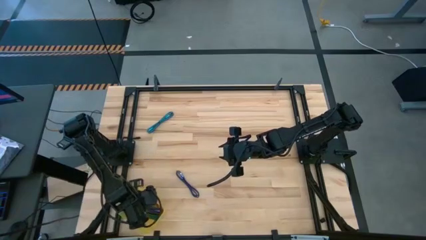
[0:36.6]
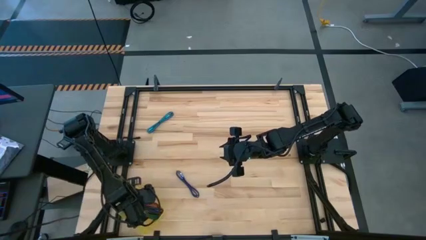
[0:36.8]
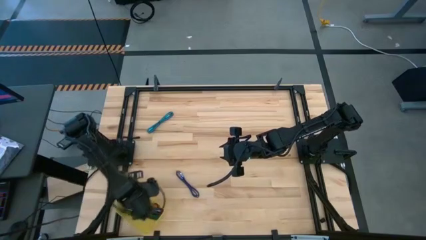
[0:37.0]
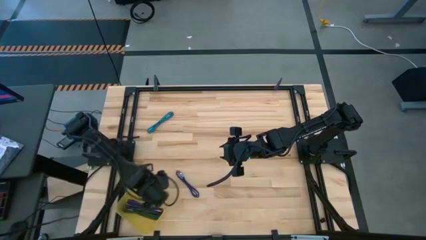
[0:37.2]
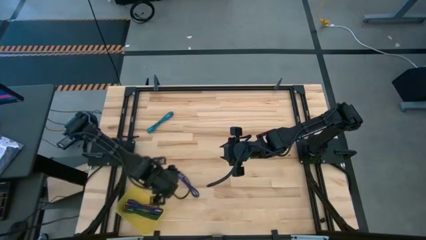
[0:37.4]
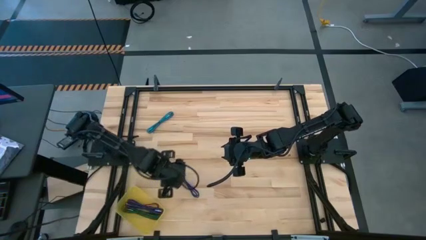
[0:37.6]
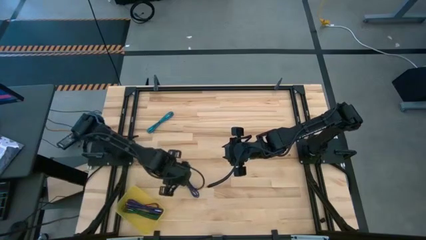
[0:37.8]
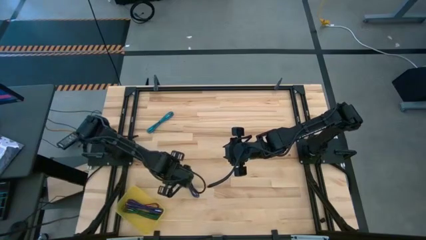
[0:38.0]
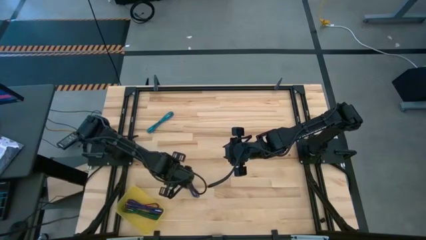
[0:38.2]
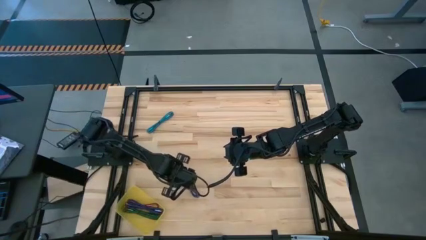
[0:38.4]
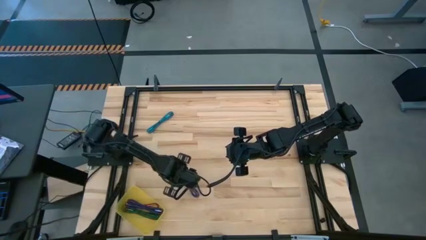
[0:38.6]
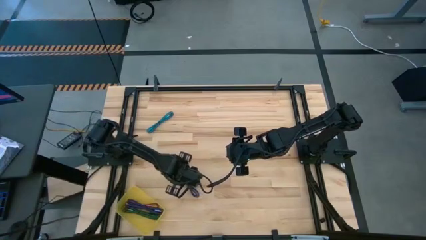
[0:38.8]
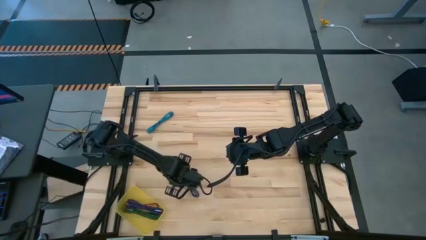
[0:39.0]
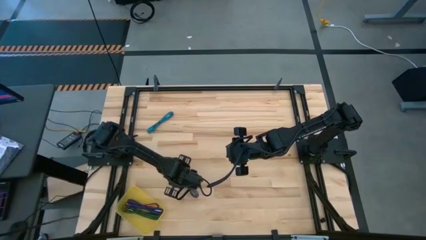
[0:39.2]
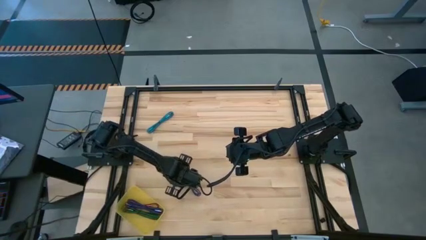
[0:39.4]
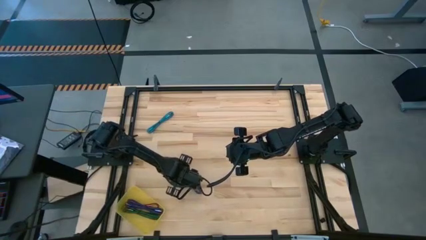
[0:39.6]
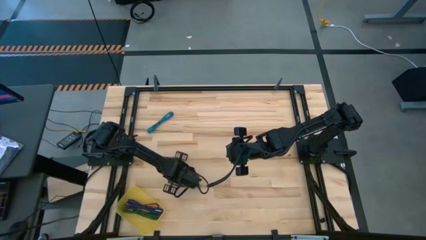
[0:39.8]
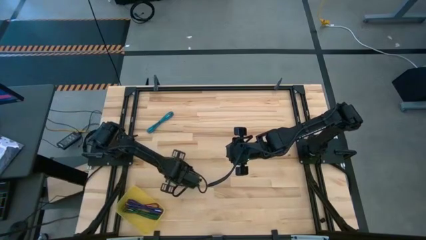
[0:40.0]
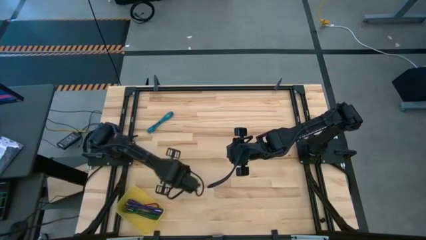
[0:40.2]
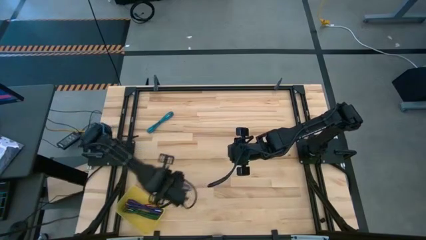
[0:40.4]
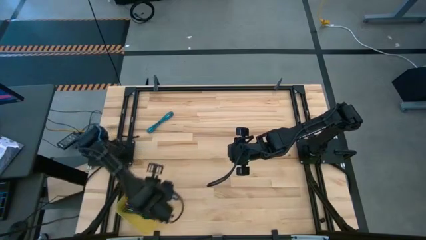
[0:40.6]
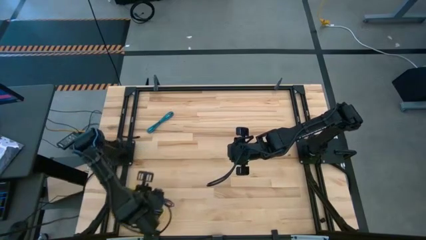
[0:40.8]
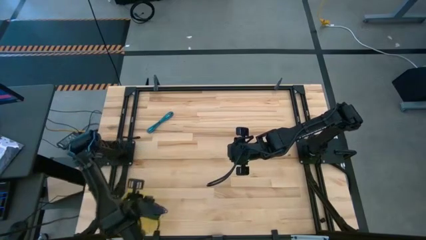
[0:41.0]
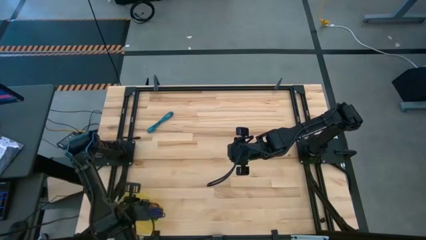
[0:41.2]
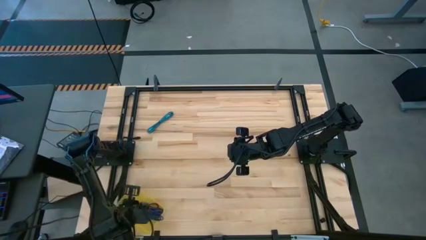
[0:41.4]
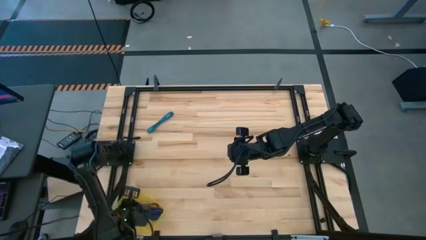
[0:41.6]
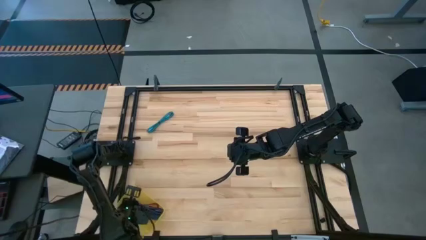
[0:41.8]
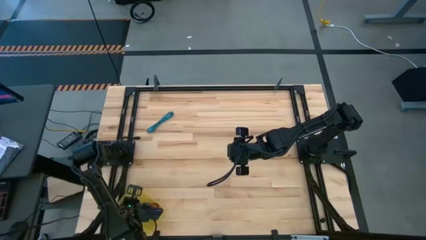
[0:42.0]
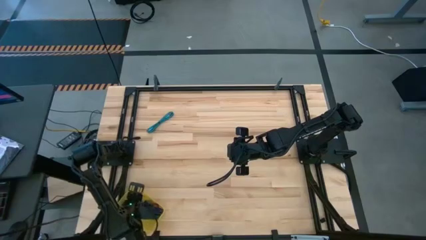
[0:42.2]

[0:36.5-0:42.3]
Task: Pick and place USB-C Cables
Put the black charger cable into the yellow bin

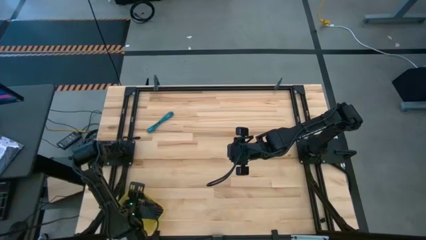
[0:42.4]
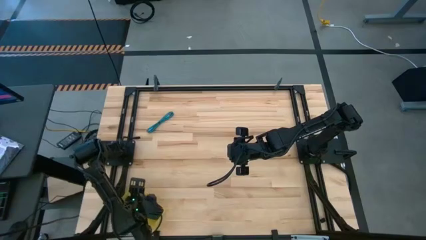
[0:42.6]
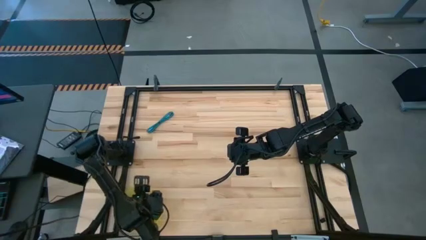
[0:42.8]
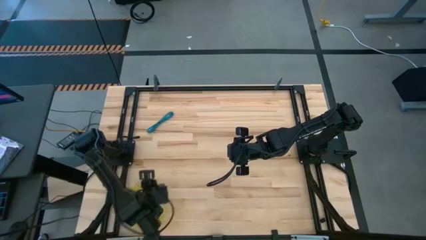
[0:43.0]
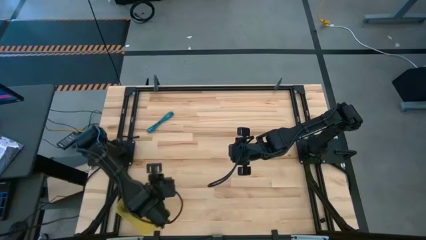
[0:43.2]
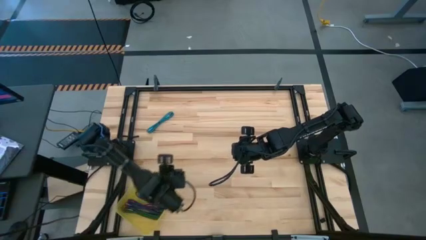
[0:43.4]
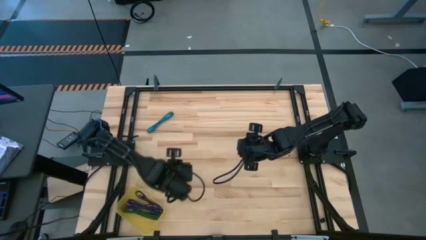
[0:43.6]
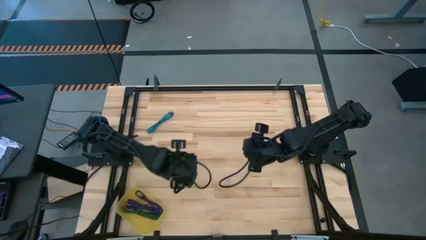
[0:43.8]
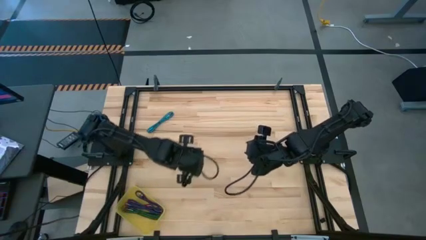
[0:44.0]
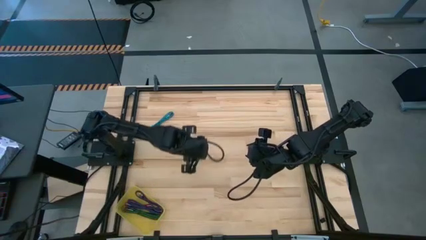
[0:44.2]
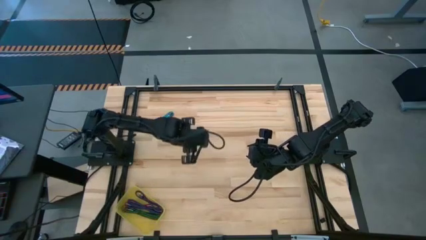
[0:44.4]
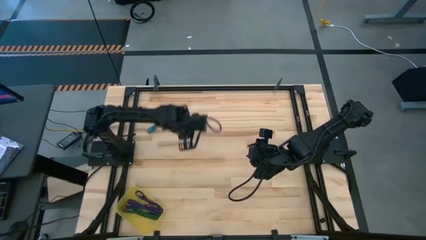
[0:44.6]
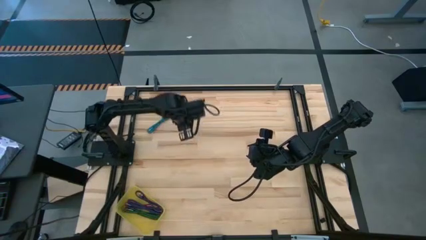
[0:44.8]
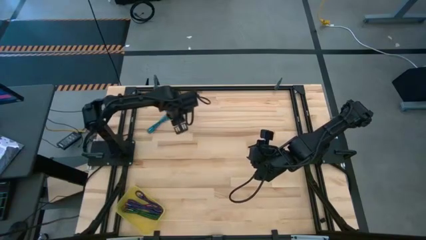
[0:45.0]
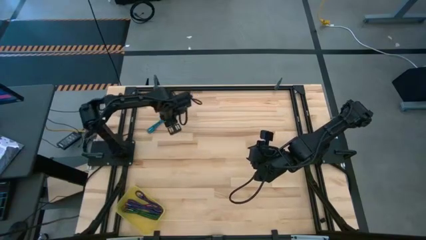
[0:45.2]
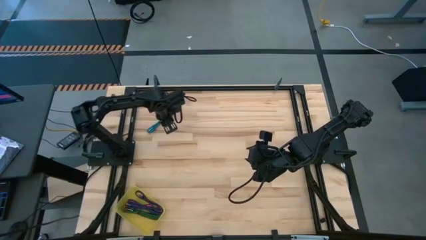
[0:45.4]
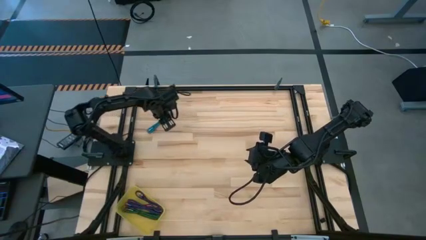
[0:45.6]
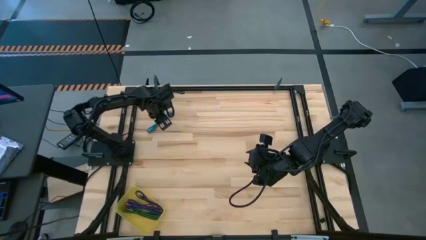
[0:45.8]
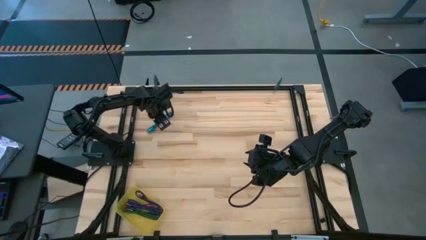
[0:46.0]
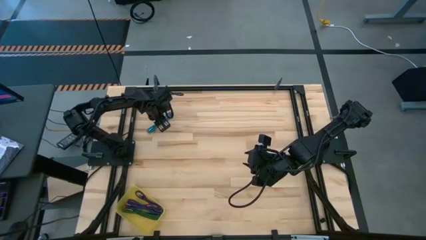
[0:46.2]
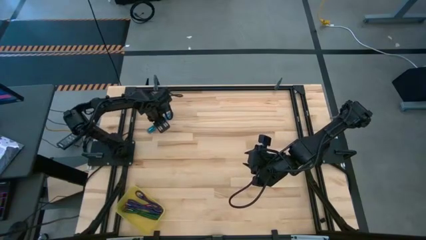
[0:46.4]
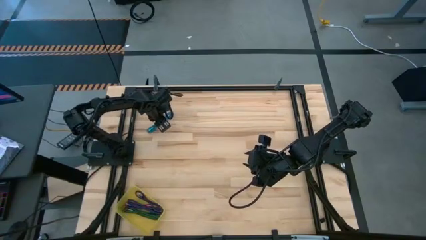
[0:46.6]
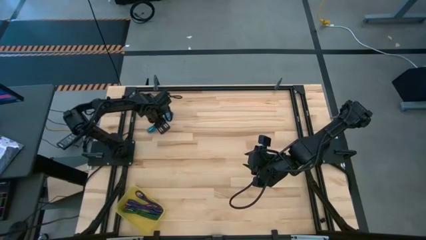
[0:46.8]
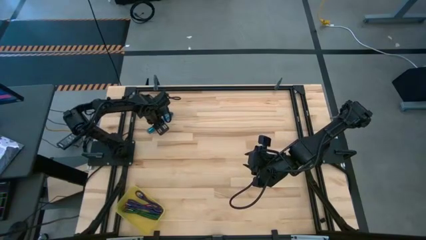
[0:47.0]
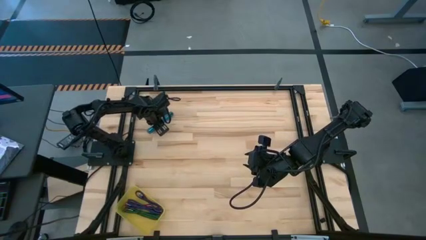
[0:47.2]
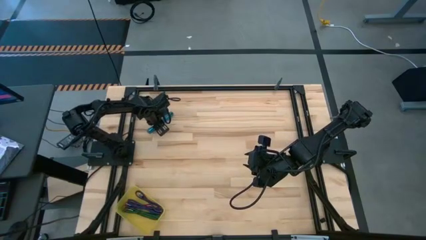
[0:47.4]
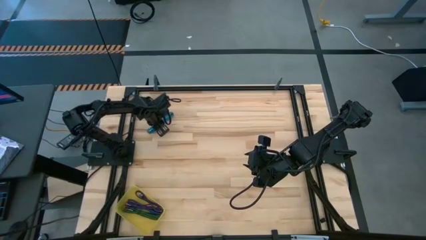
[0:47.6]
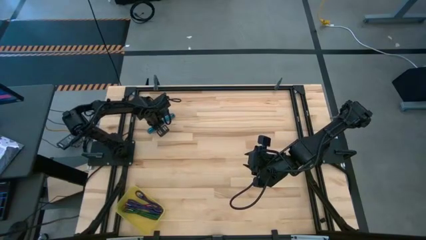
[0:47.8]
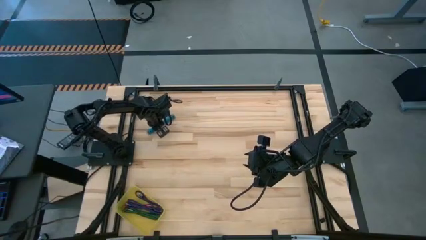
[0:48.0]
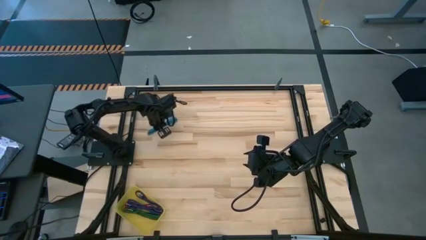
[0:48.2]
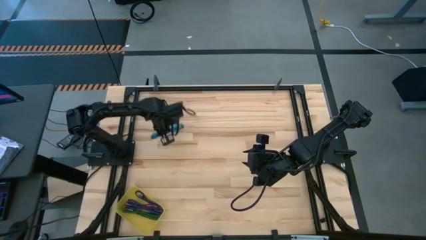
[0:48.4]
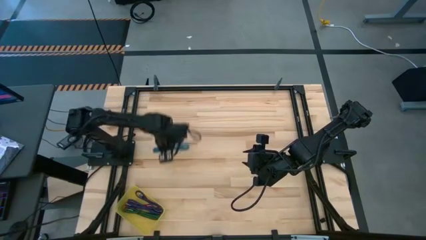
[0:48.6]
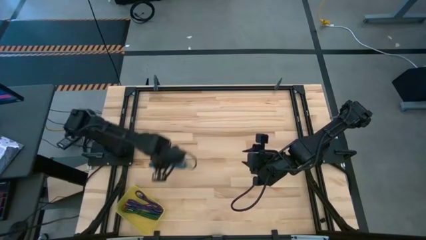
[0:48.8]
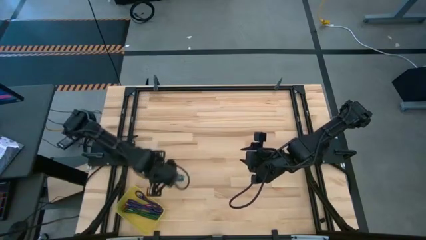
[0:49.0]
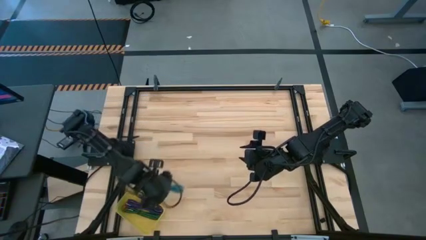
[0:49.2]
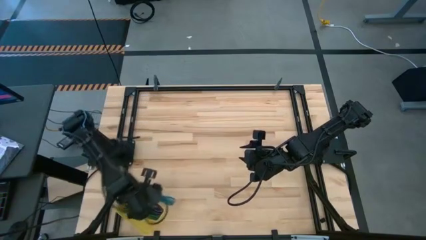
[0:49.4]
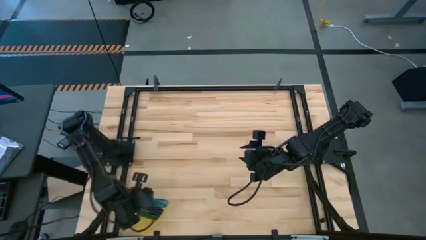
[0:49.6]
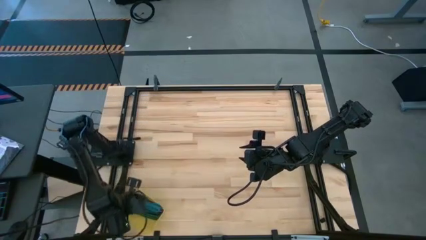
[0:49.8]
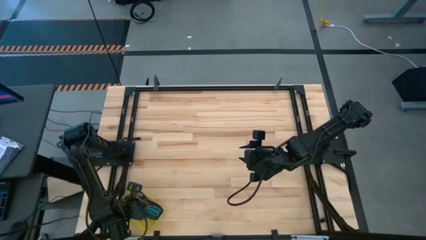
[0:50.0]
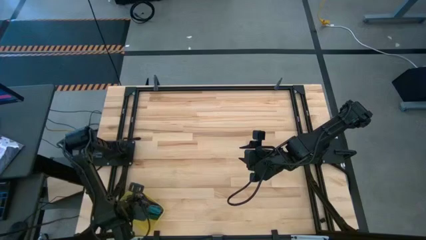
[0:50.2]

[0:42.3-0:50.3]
Put the black charger cable into the yellow bin
